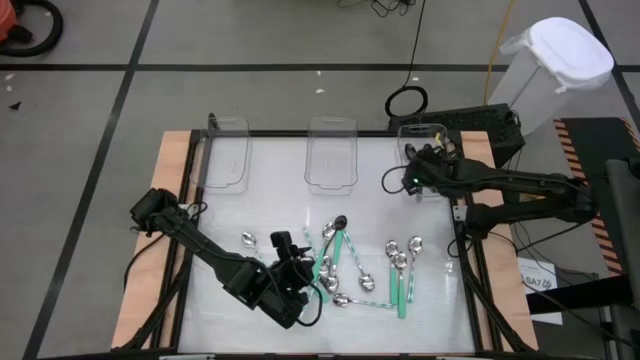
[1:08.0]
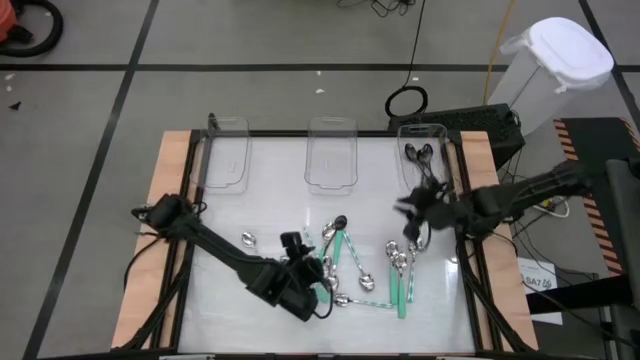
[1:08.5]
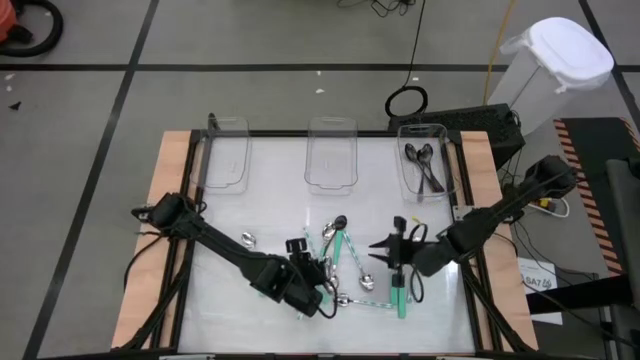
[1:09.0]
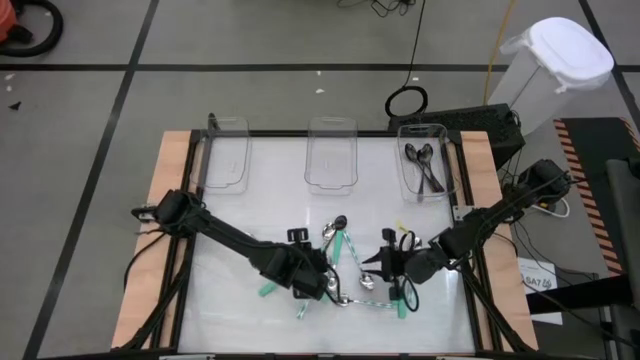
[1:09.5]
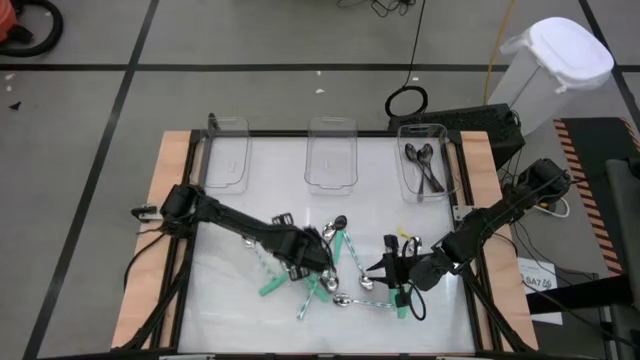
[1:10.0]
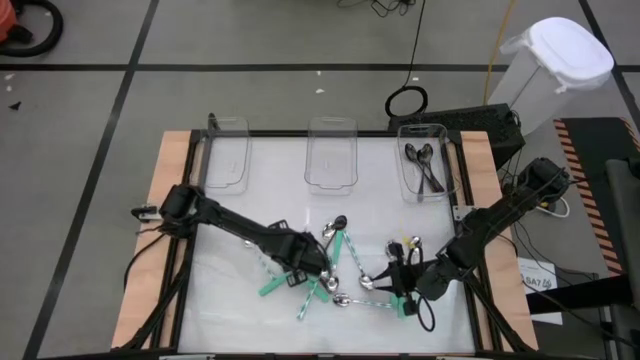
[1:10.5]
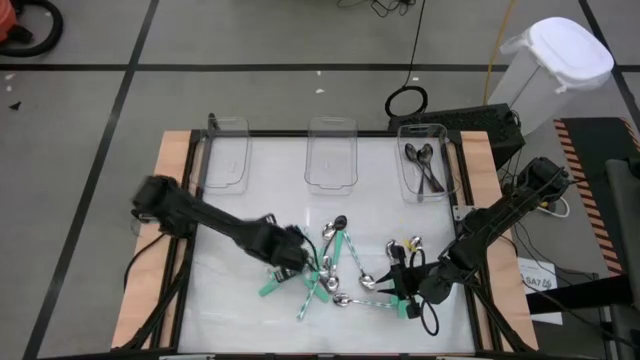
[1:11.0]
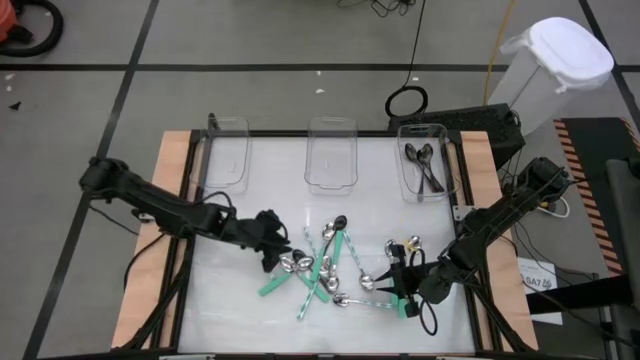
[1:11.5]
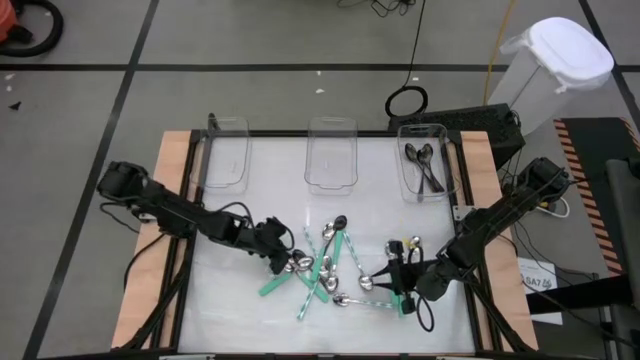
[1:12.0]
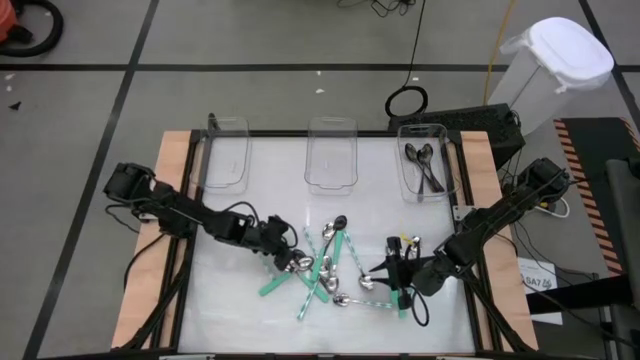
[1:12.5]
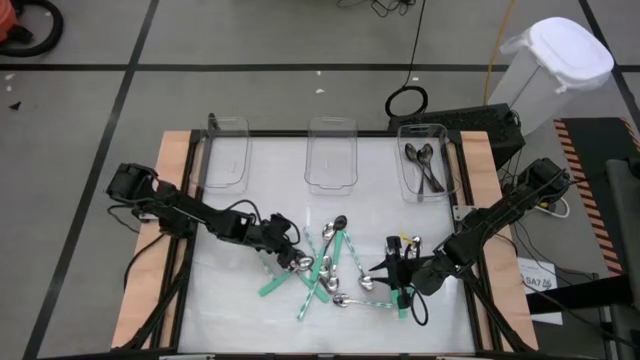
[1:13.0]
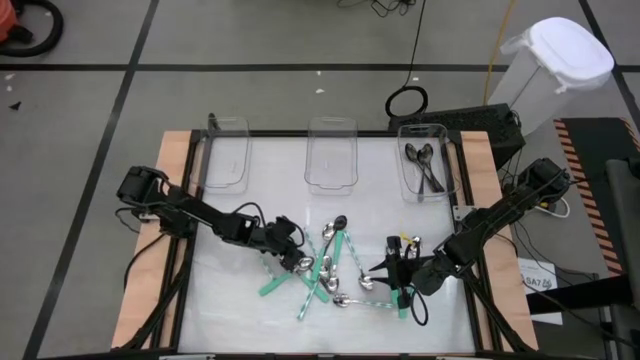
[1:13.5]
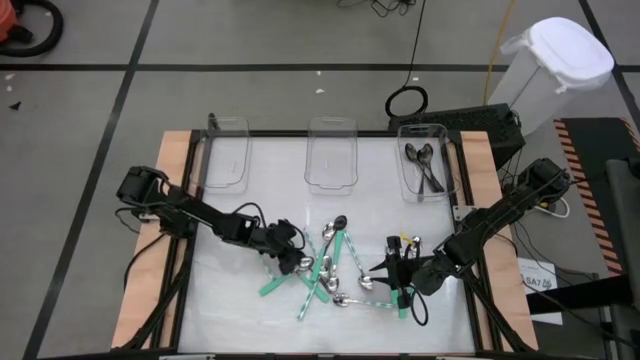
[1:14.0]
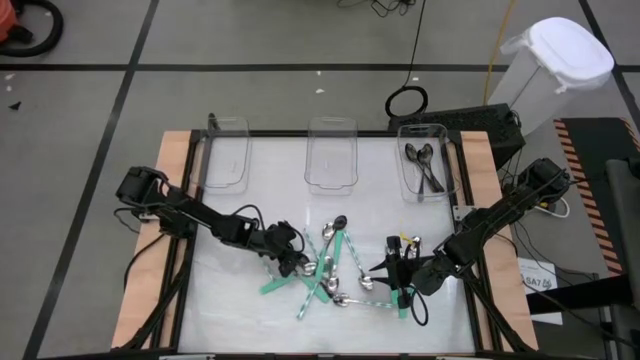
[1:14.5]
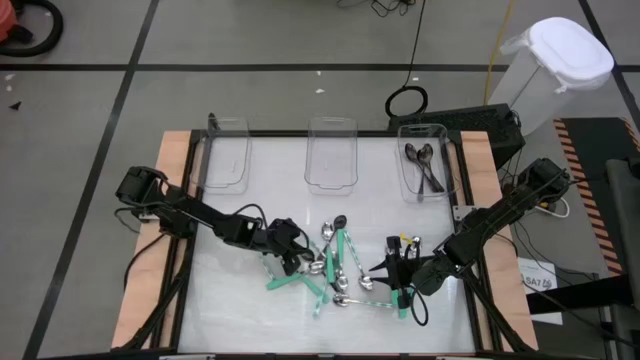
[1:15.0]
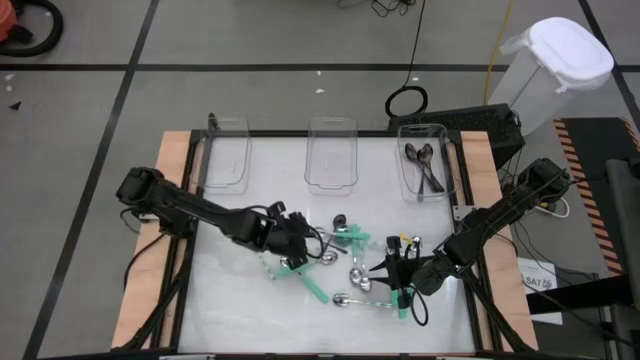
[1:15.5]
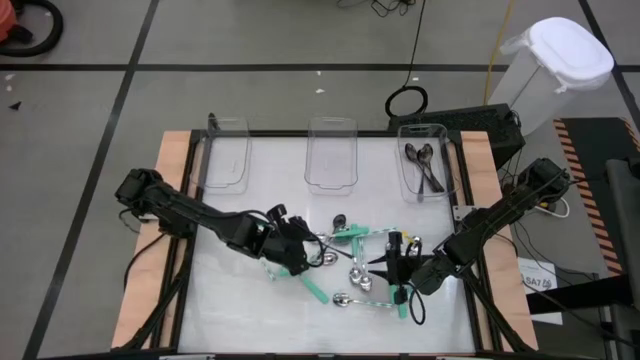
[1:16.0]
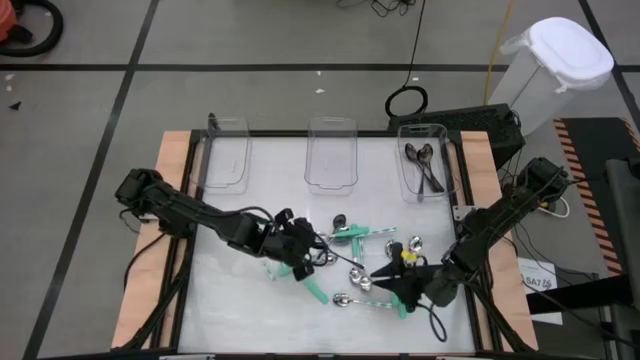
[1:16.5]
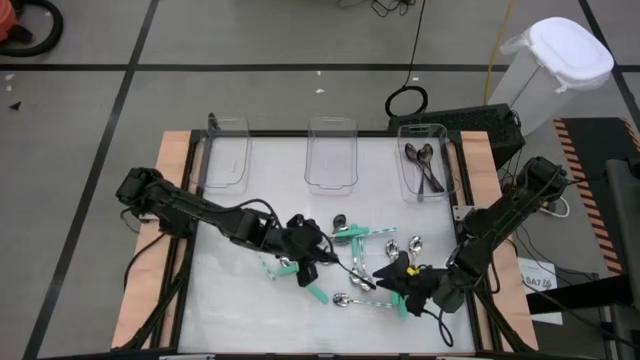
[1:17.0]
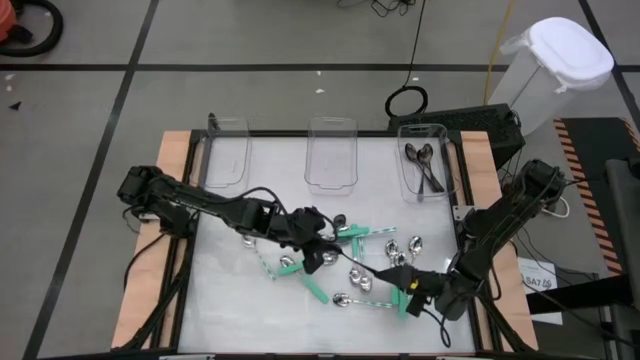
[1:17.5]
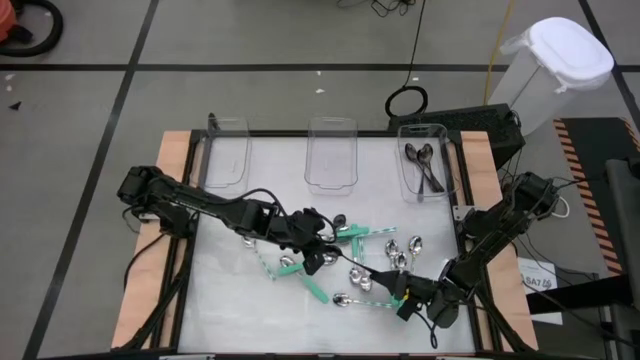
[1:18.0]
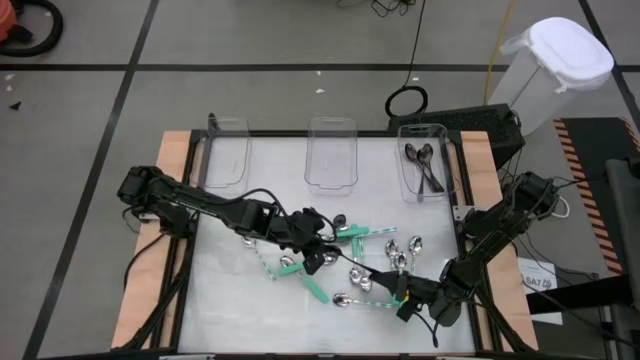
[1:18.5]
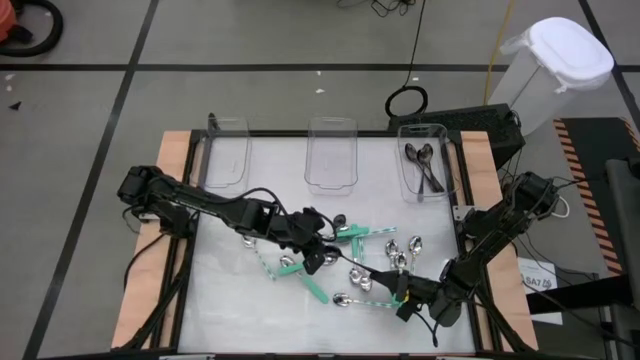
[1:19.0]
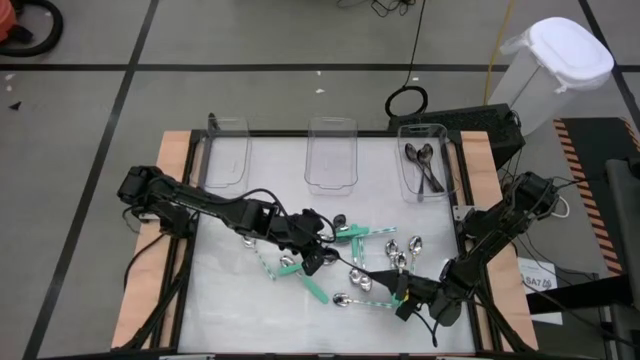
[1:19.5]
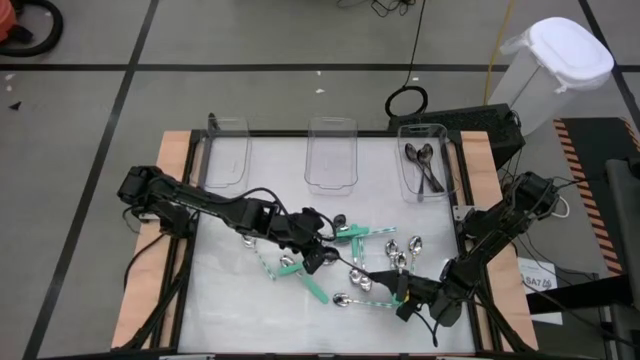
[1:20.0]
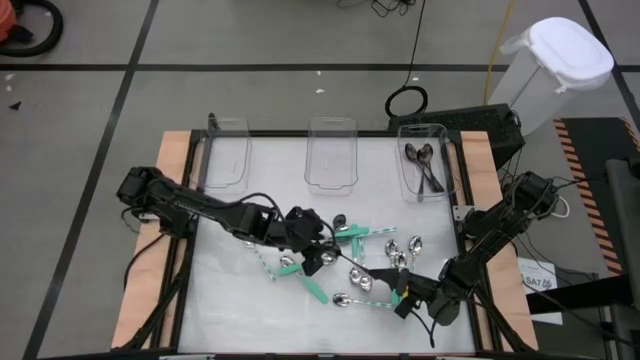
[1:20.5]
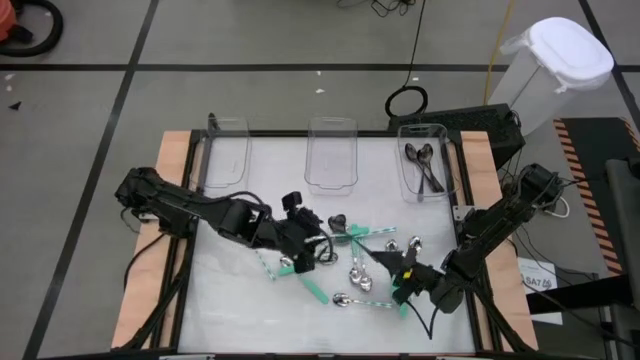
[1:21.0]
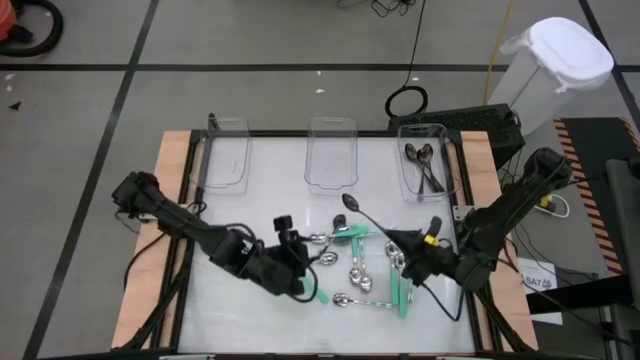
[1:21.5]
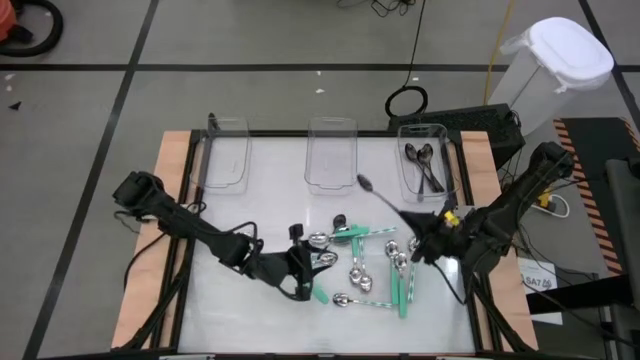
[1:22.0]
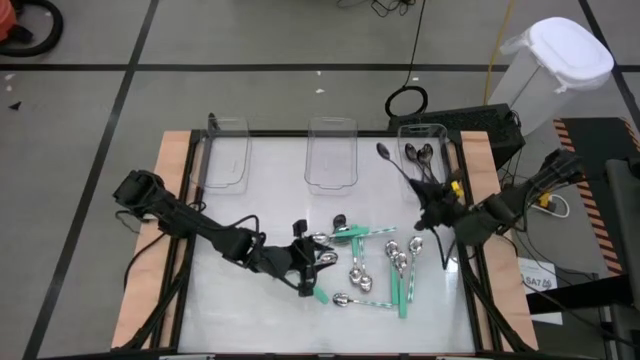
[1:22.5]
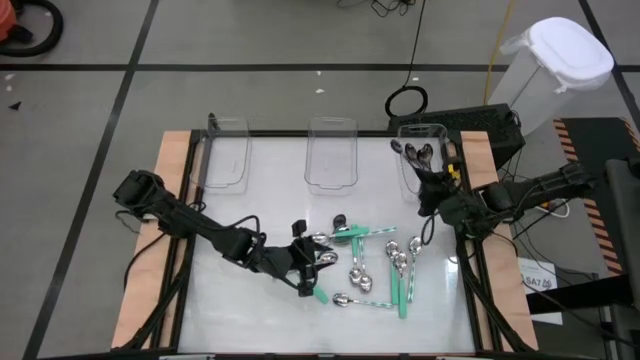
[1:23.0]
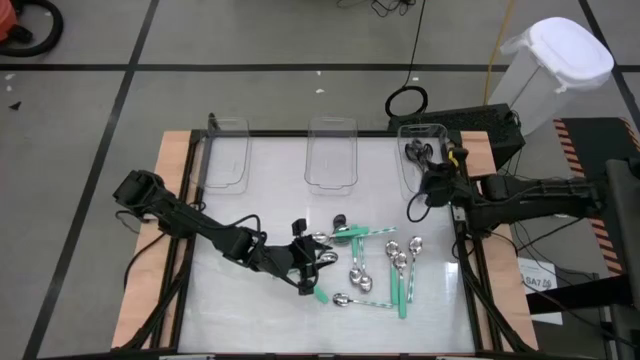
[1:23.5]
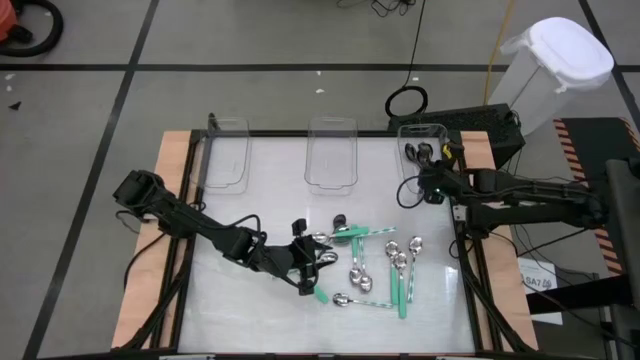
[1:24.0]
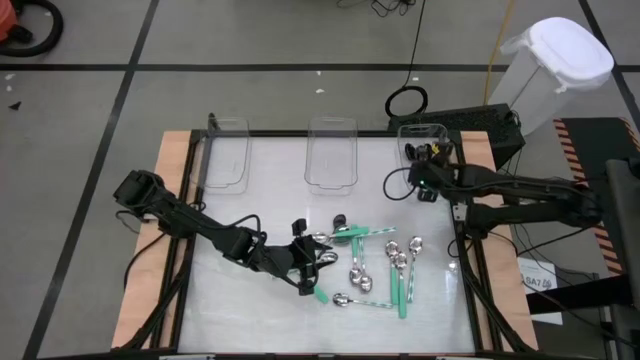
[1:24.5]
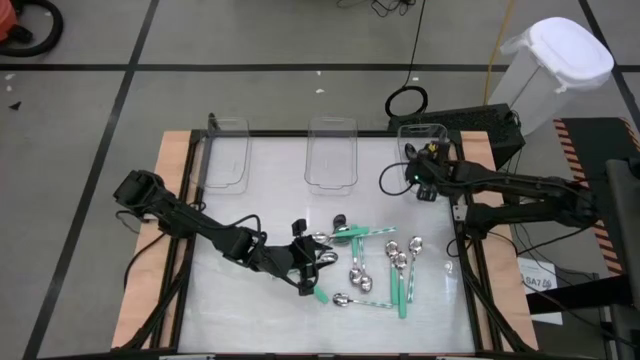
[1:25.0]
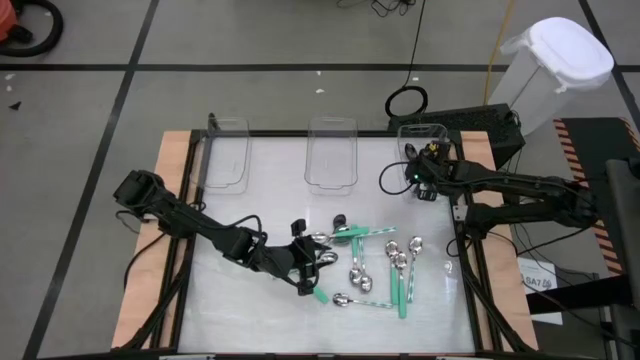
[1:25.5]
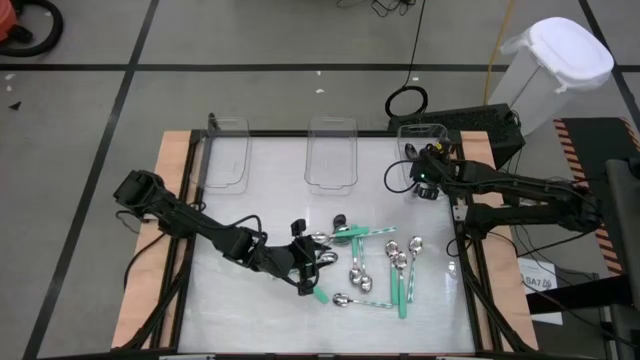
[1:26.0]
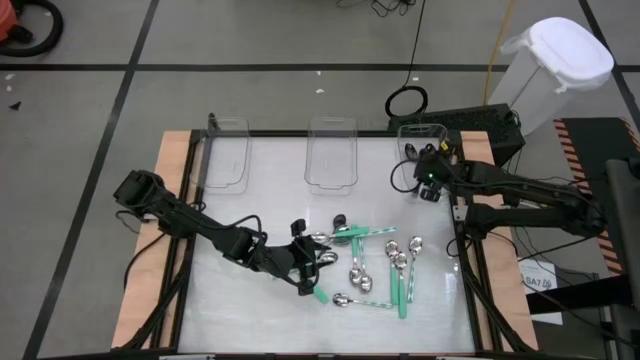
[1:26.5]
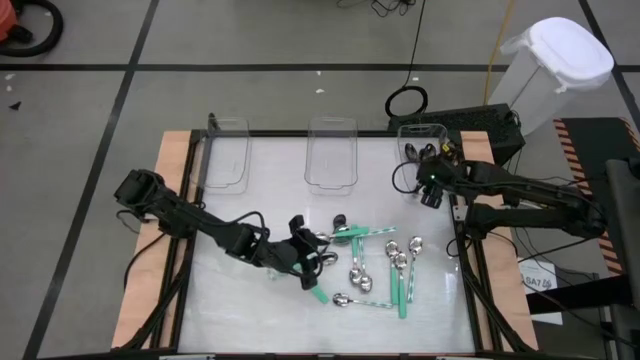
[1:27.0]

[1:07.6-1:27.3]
Task: Sort silverware by color (type)
Put the black spoon into the right transparent bin
